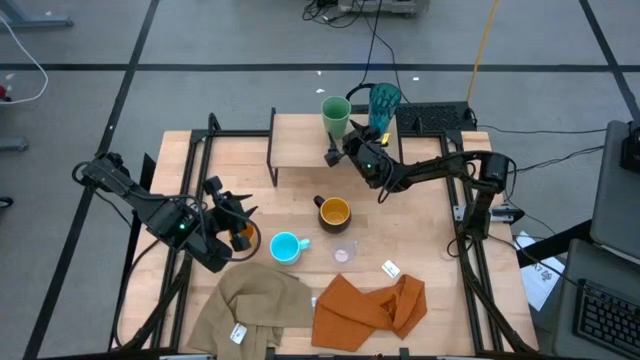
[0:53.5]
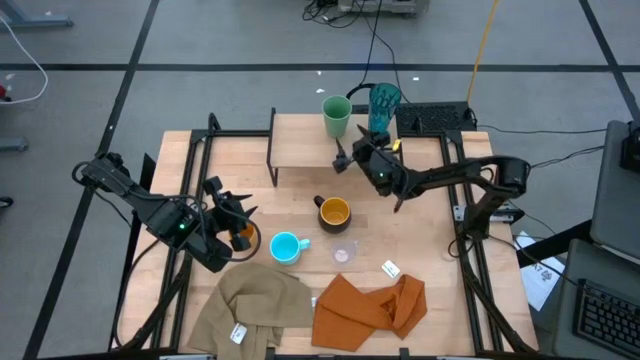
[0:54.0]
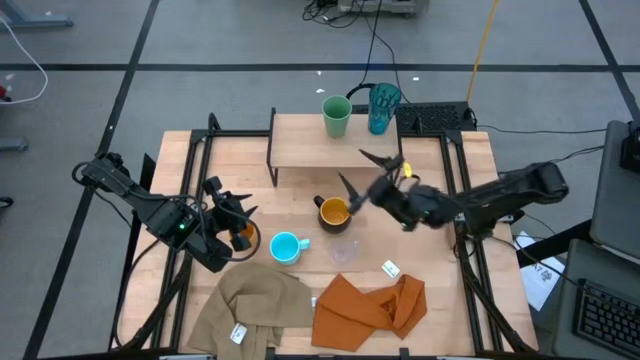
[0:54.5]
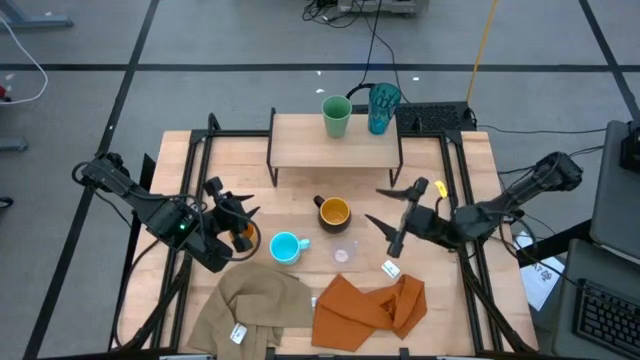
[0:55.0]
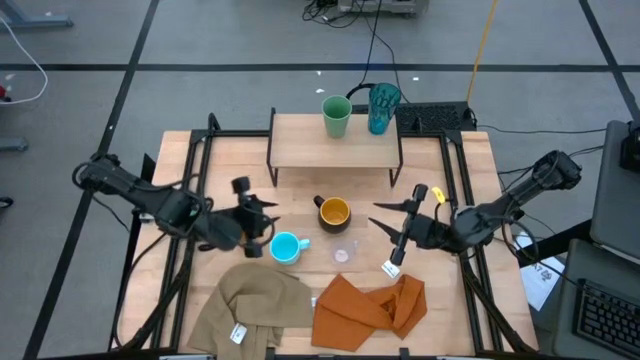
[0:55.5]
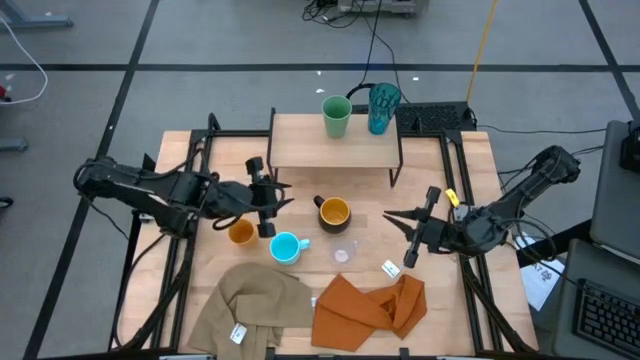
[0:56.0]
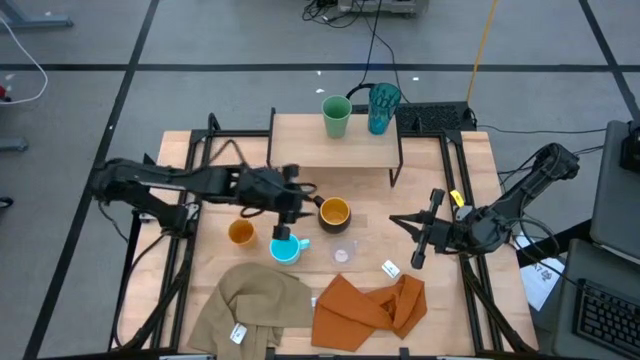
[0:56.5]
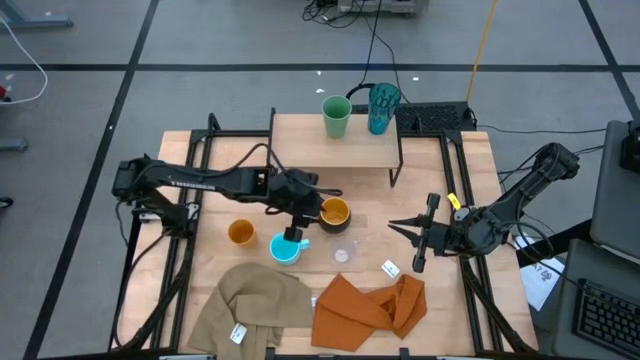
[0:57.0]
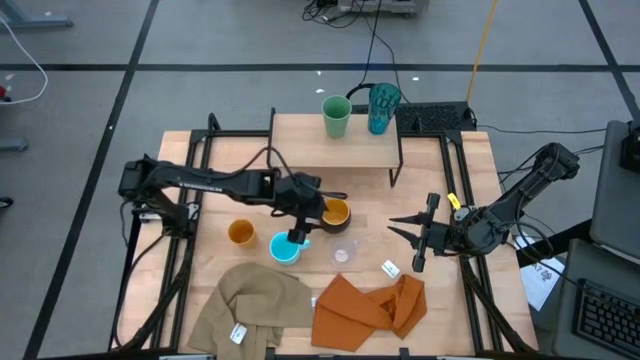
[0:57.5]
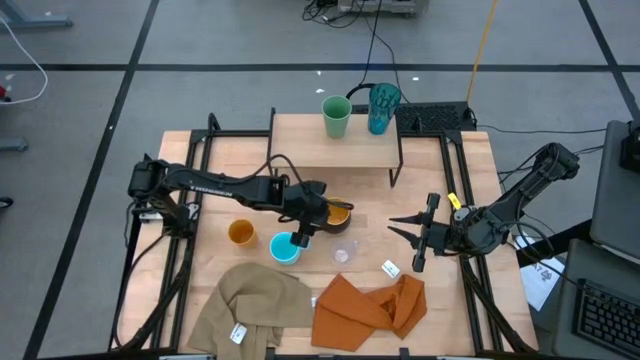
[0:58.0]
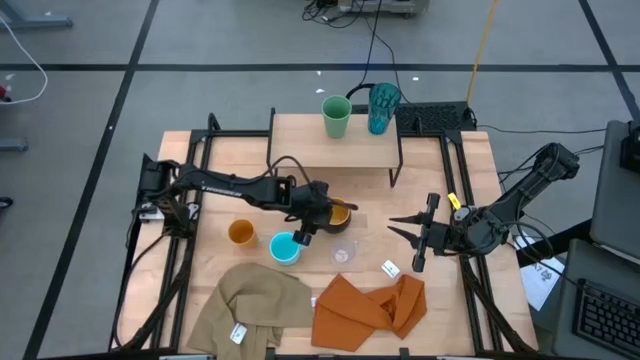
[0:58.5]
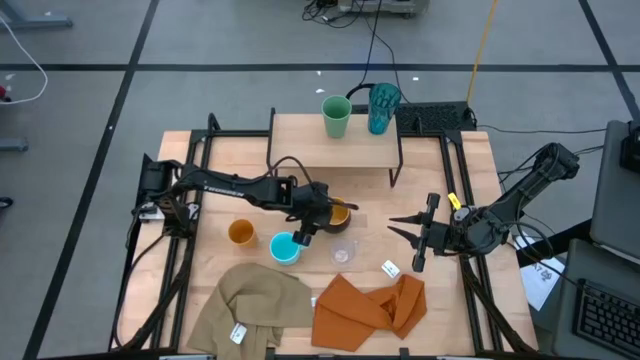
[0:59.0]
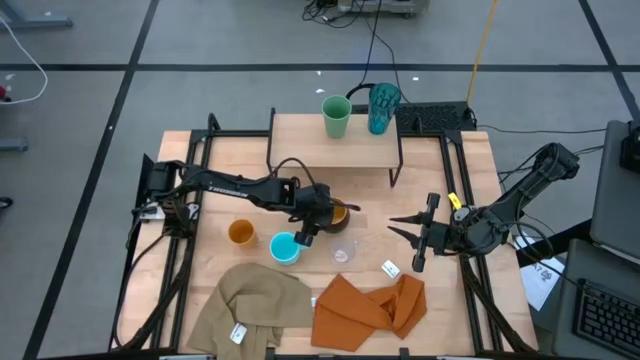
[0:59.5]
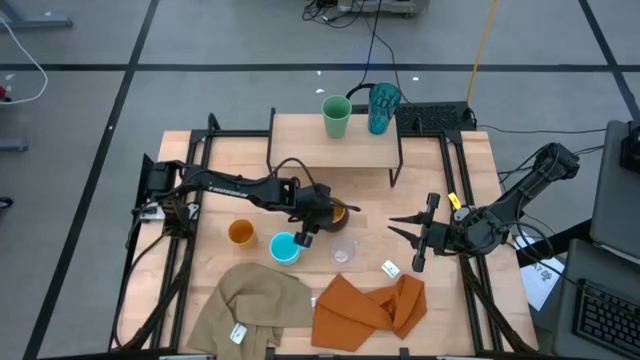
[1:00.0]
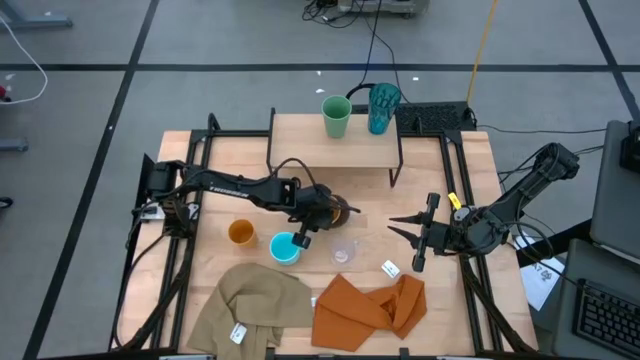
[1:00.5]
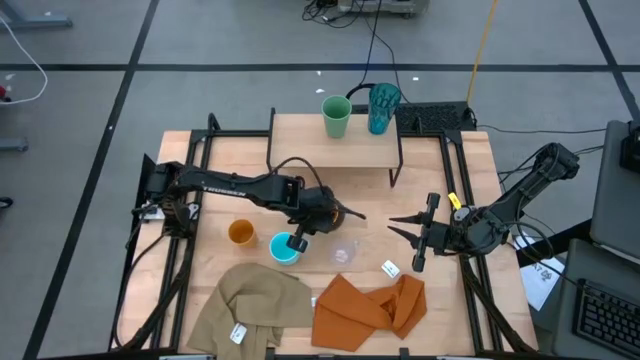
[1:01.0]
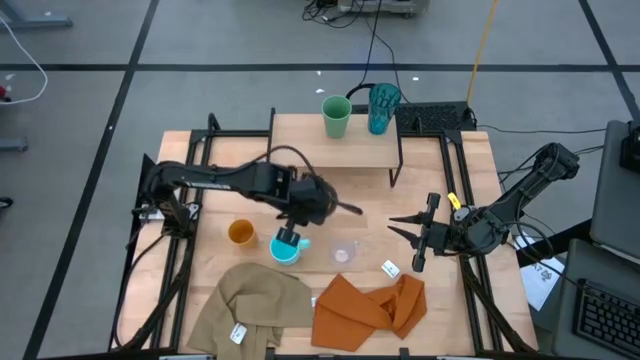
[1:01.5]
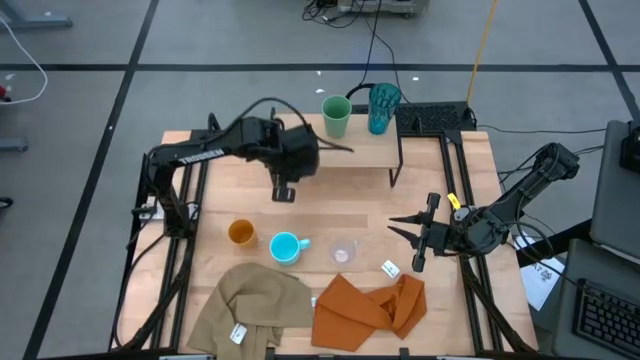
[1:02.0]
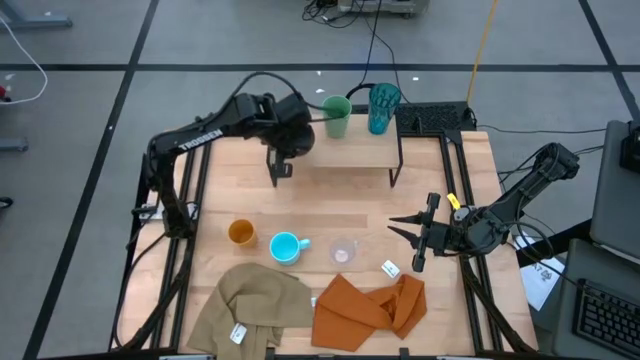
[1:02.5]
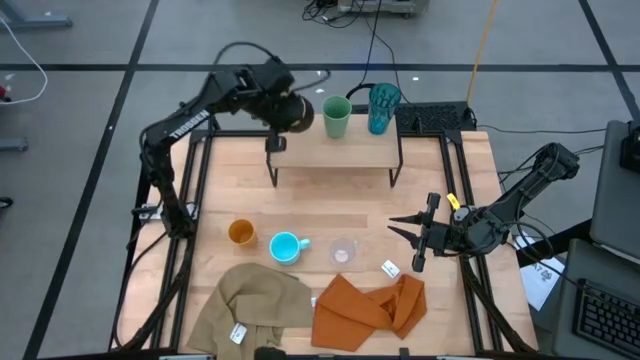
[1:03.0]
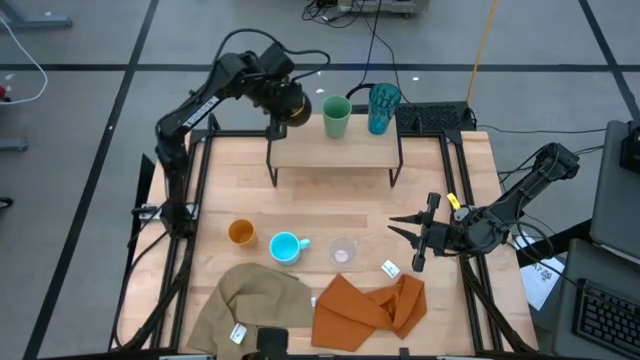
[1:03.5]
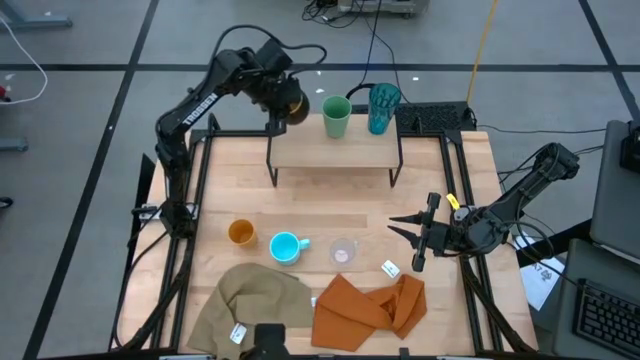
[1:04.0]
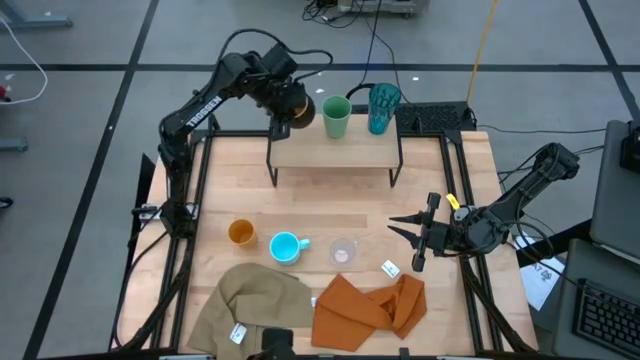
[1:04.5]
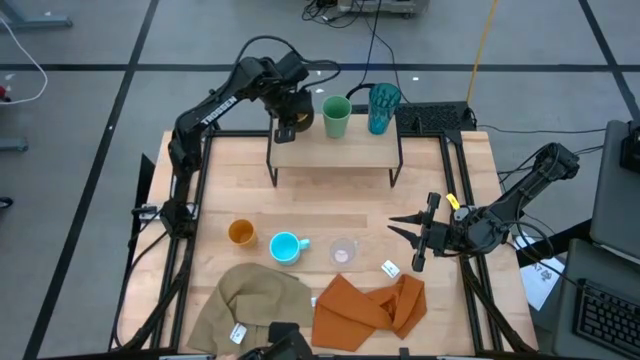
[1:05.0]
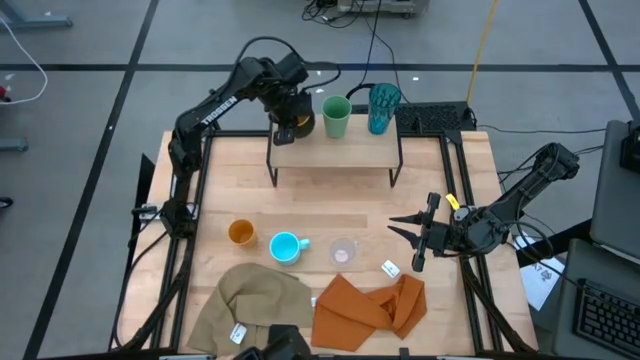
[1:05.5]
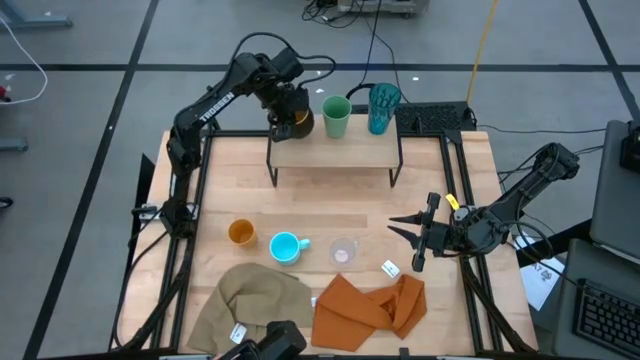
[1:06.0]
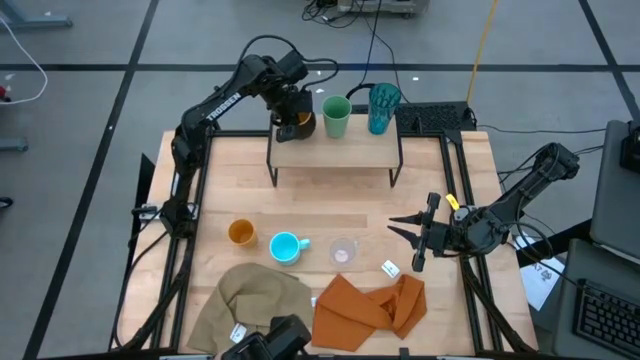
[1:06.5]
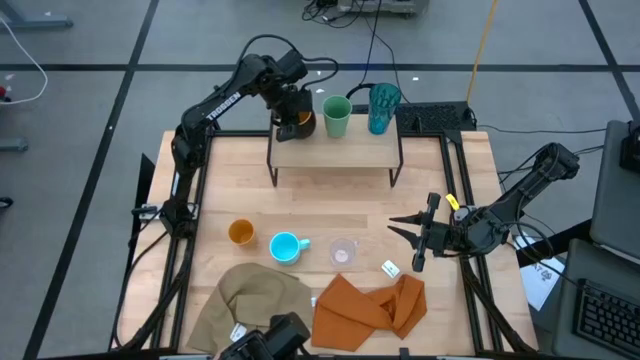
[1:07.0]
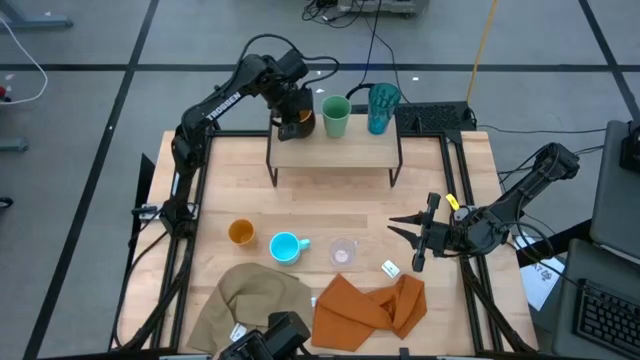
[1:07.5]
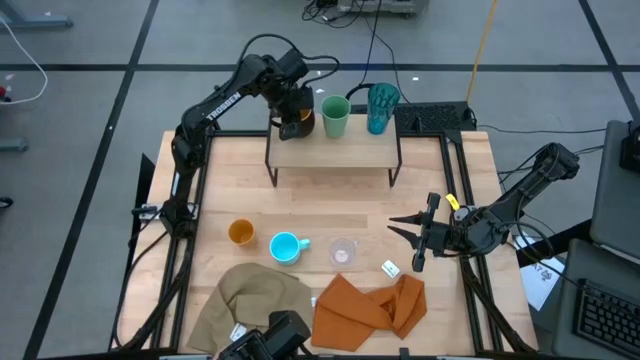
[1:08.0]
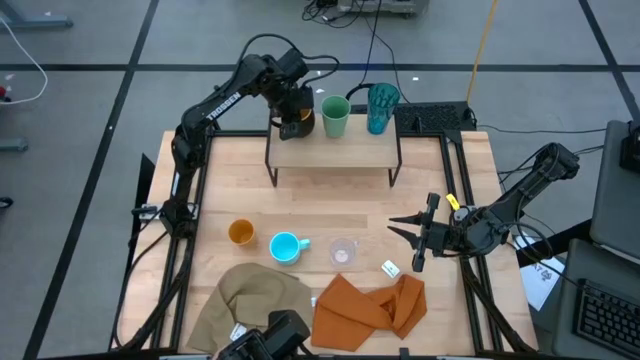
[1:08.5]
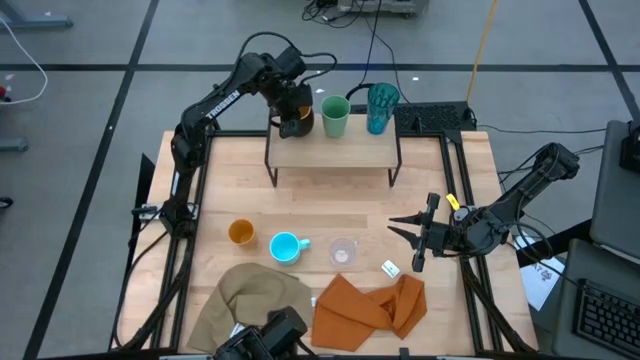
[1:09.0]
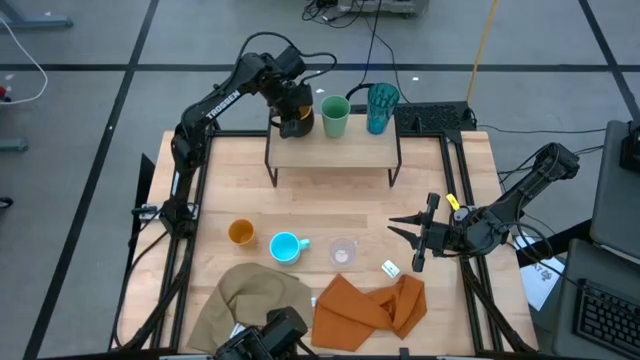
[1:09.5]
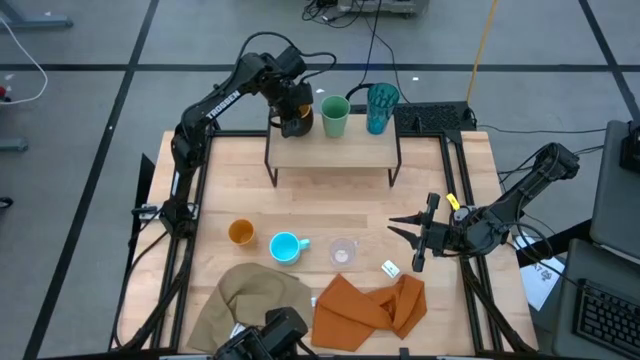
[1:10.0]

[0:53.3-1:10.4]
Task: Stack small to large cups/mugs on shelf
Put the black mug on the shelf

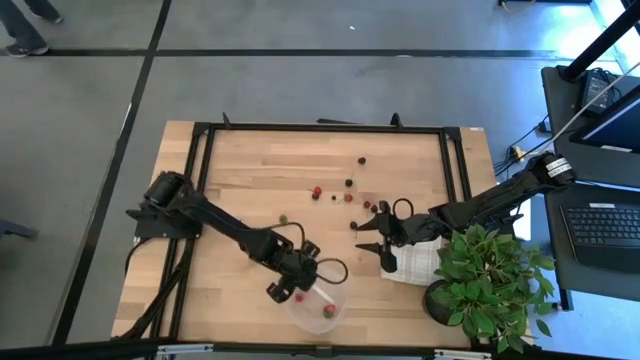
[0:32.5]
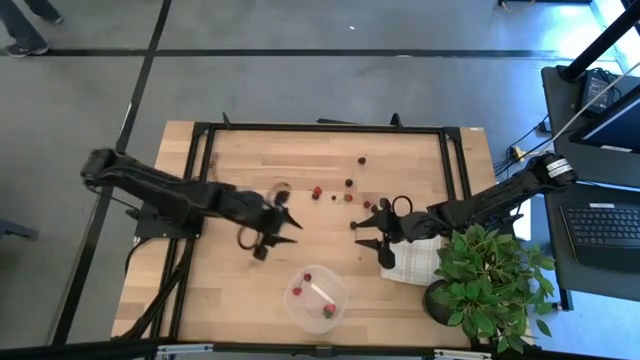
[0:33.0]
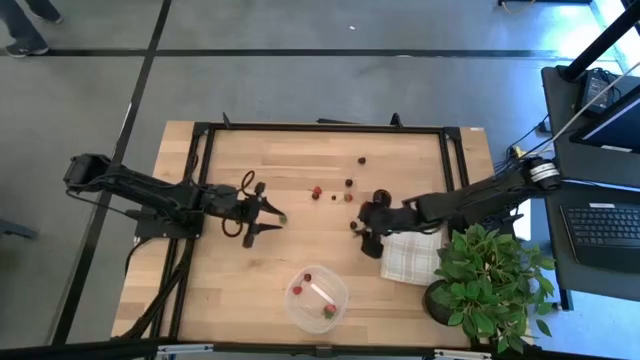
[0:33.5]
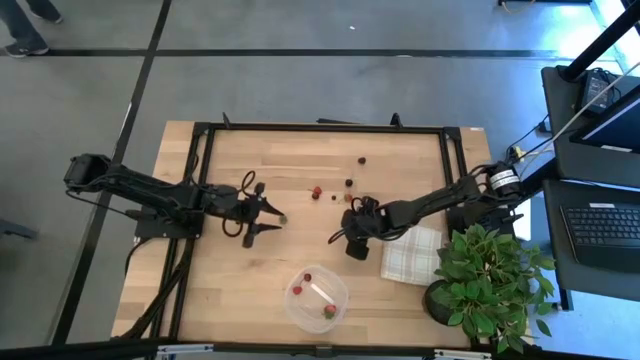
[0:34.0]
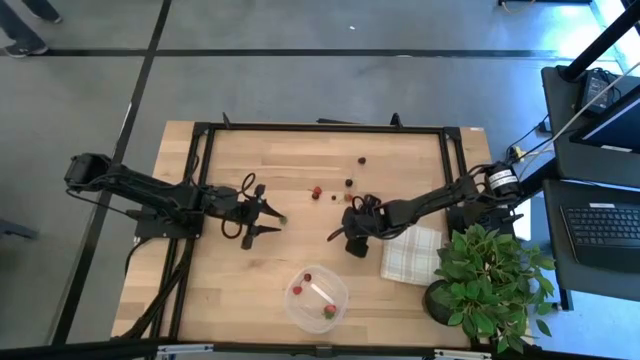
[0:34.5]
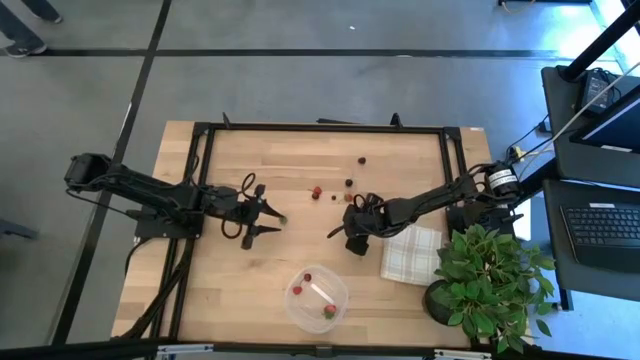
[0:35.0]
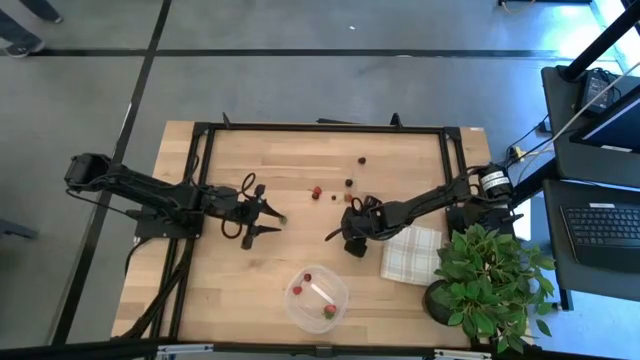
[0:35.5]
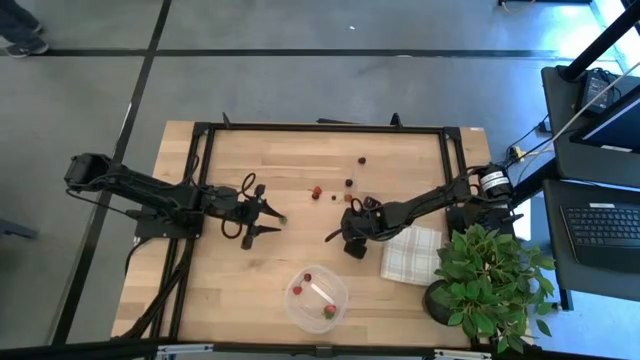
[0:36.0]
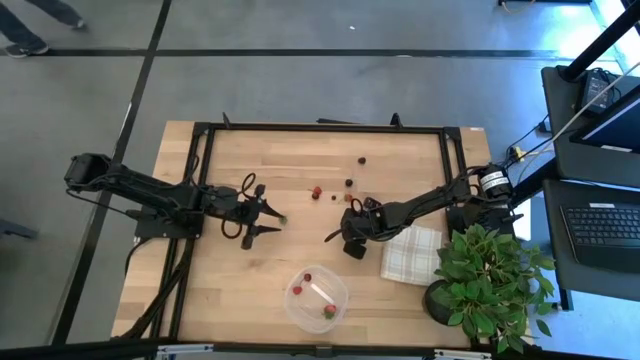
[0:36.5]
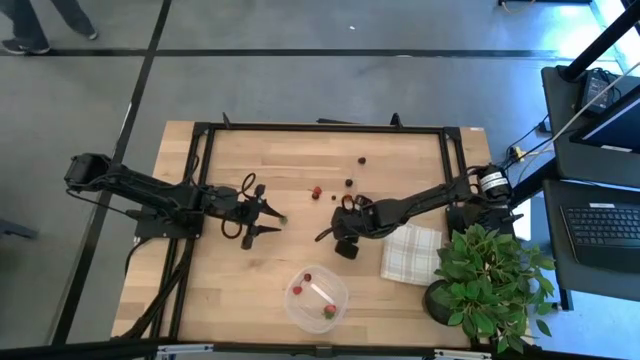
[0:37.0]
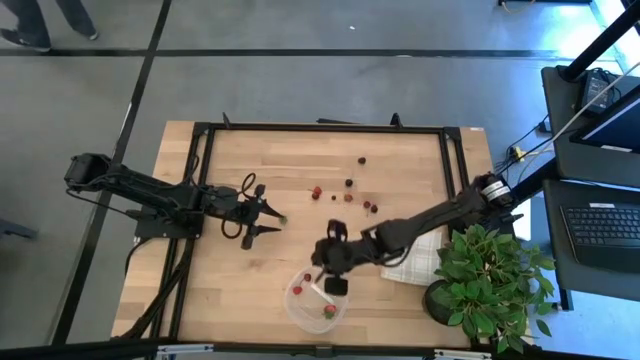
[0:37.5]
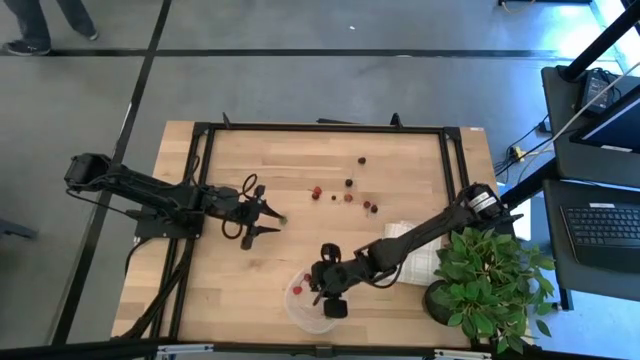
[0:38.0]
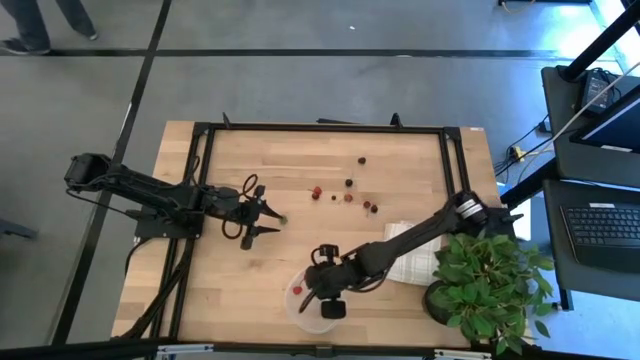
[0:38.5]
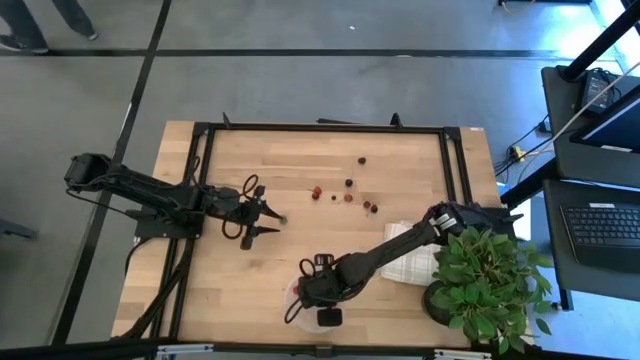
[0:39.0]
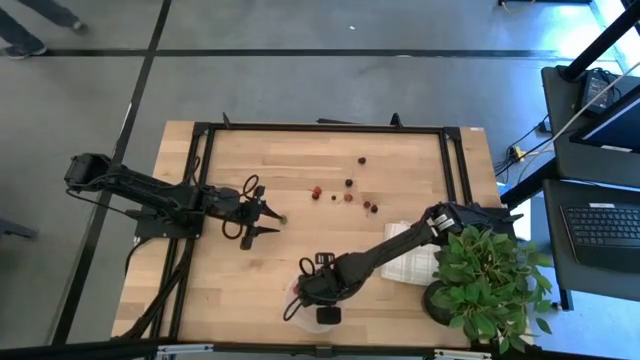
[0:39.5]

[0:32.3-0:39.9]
Task: Pick and placing Produce into tupperware
Put the black cherry in the bottom transparent bin
